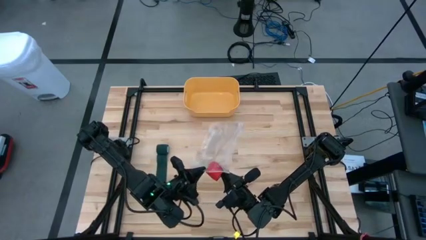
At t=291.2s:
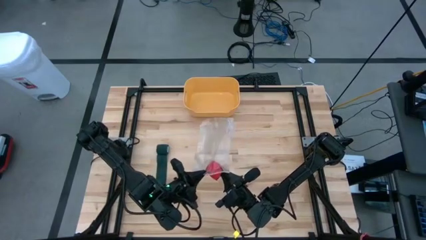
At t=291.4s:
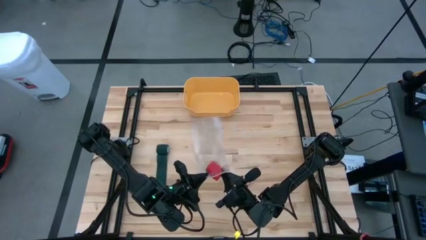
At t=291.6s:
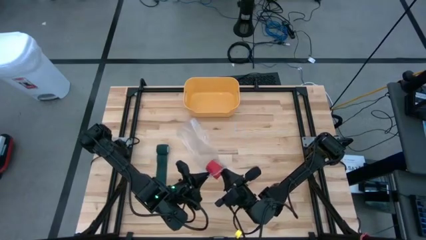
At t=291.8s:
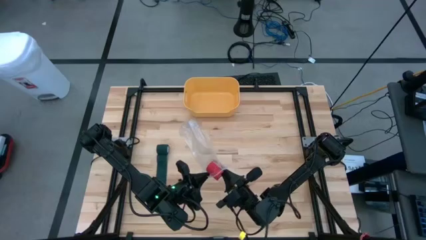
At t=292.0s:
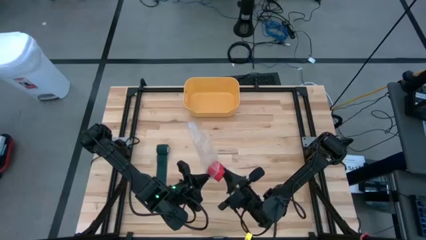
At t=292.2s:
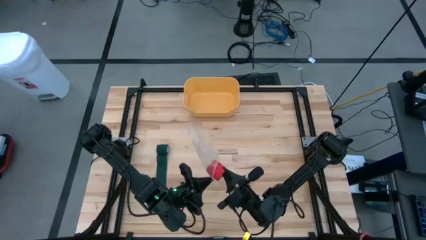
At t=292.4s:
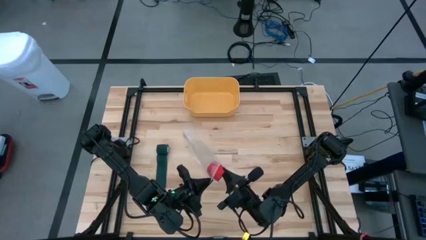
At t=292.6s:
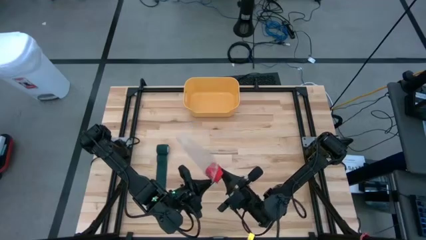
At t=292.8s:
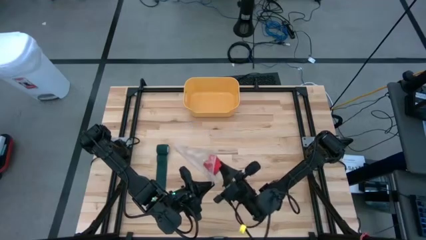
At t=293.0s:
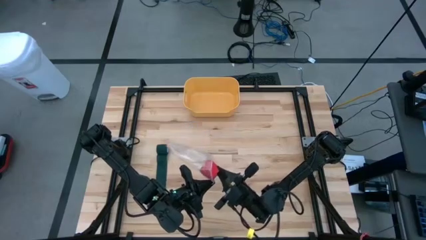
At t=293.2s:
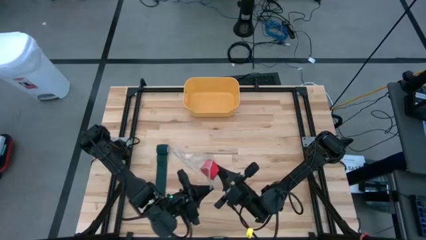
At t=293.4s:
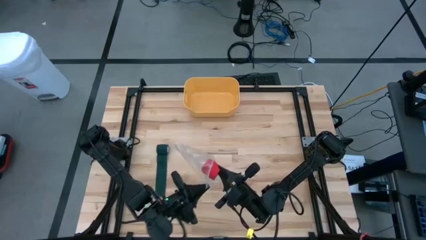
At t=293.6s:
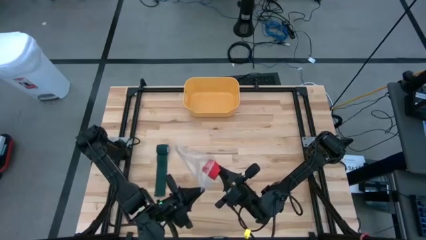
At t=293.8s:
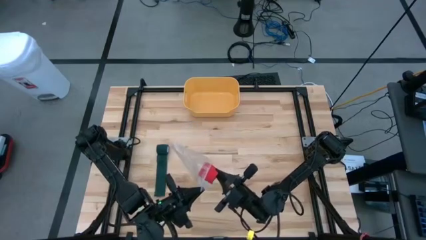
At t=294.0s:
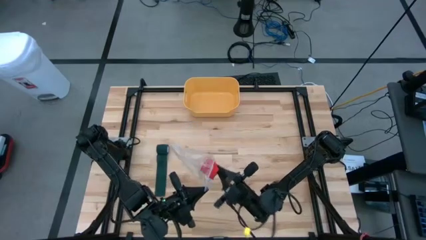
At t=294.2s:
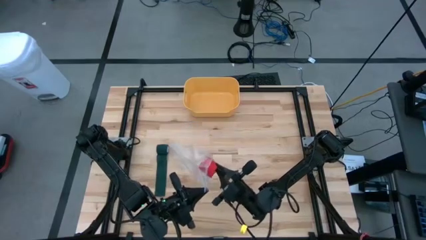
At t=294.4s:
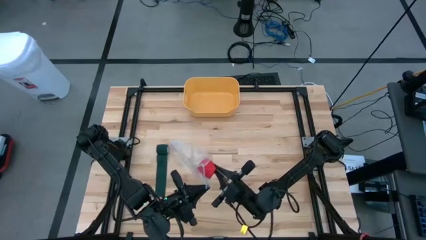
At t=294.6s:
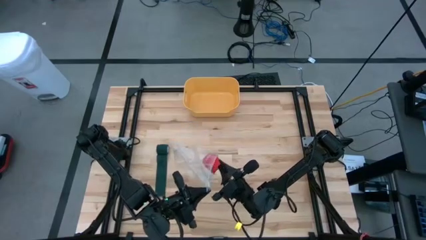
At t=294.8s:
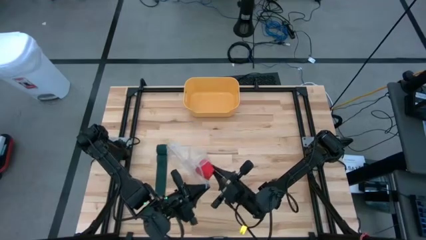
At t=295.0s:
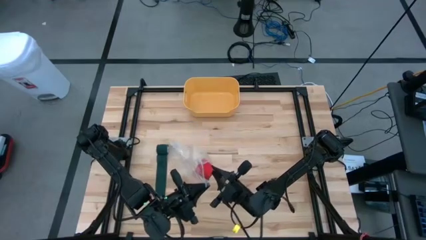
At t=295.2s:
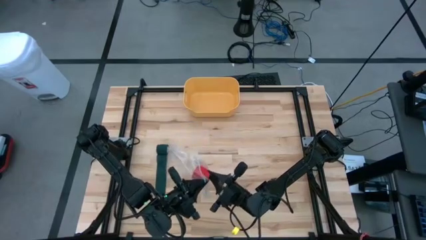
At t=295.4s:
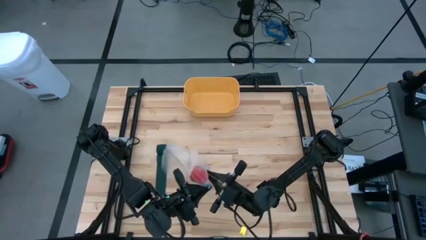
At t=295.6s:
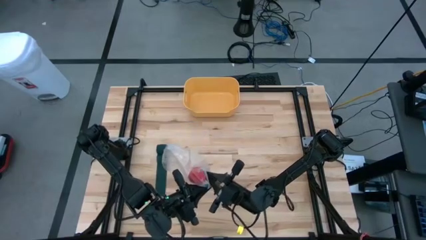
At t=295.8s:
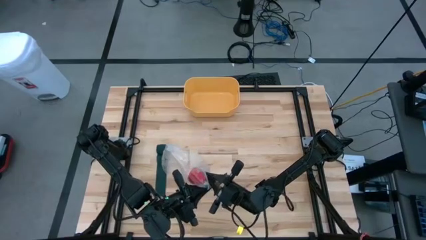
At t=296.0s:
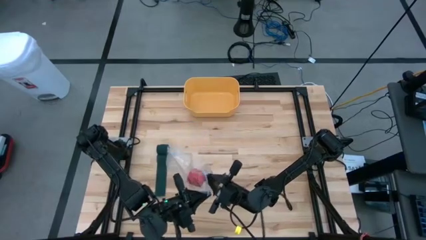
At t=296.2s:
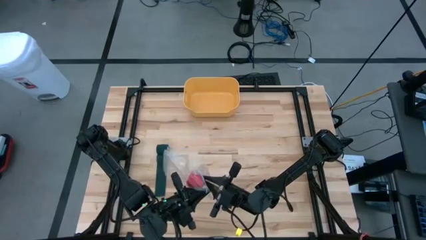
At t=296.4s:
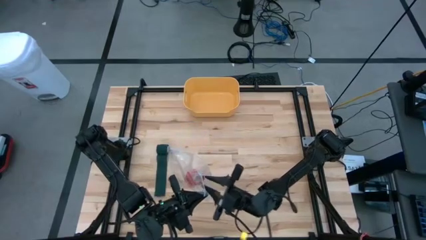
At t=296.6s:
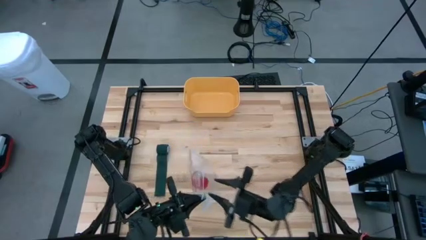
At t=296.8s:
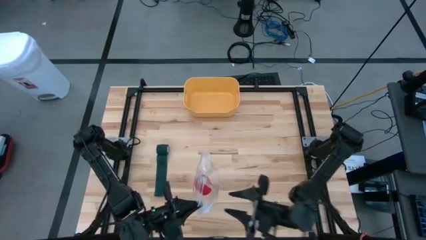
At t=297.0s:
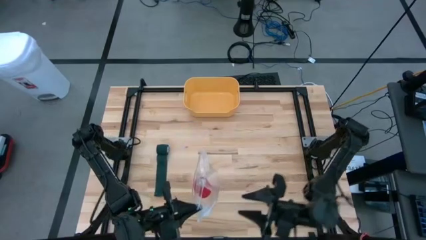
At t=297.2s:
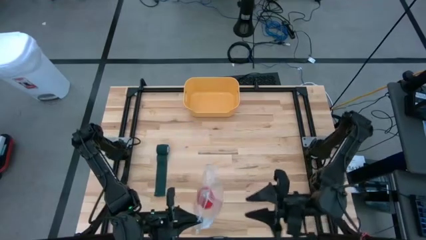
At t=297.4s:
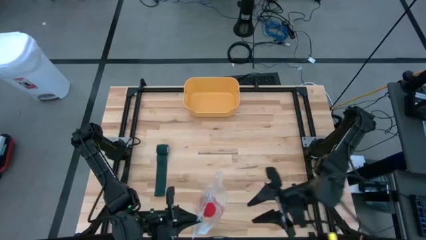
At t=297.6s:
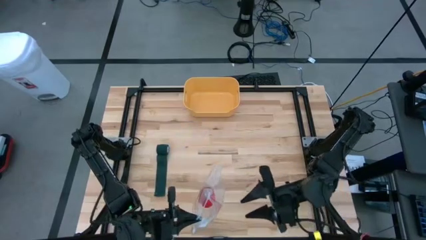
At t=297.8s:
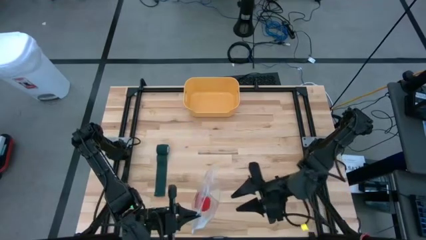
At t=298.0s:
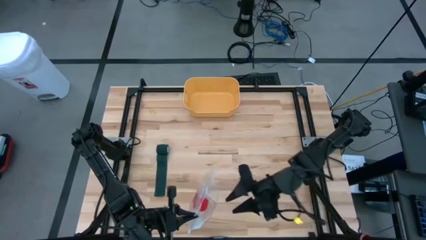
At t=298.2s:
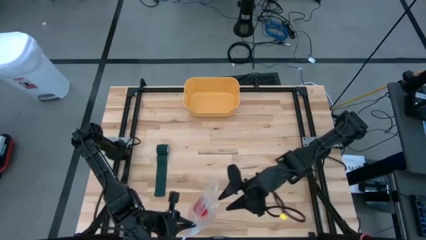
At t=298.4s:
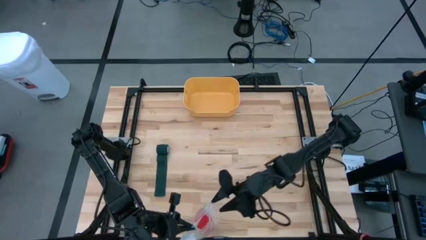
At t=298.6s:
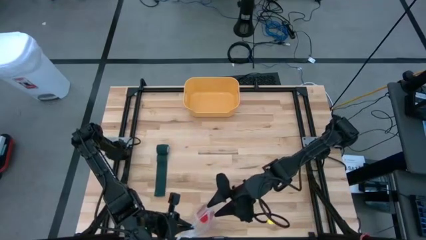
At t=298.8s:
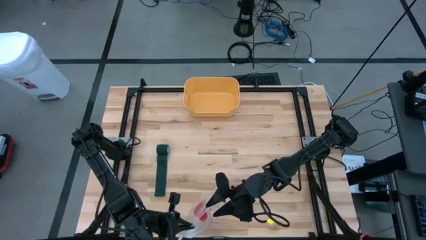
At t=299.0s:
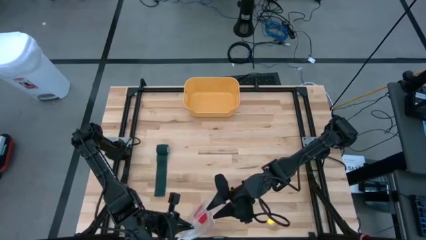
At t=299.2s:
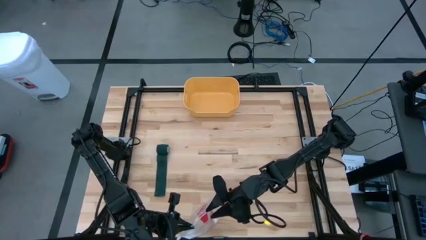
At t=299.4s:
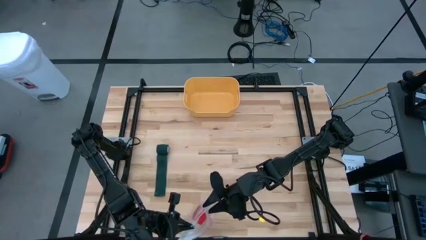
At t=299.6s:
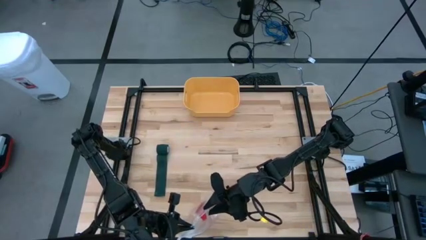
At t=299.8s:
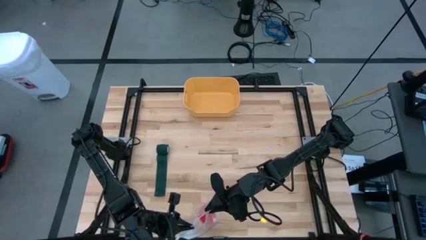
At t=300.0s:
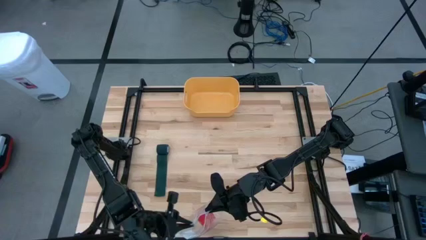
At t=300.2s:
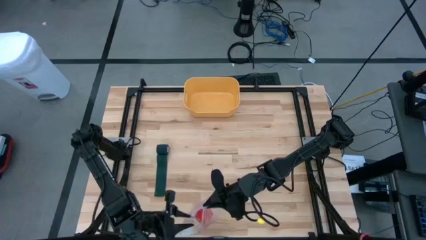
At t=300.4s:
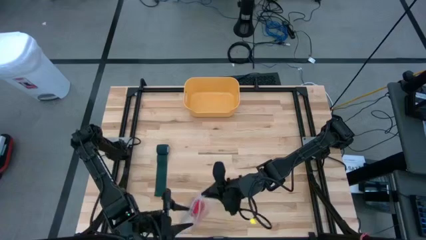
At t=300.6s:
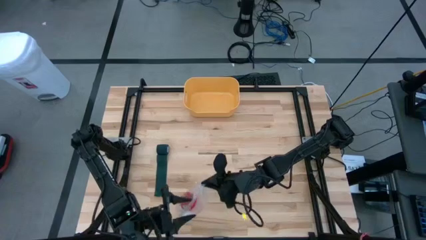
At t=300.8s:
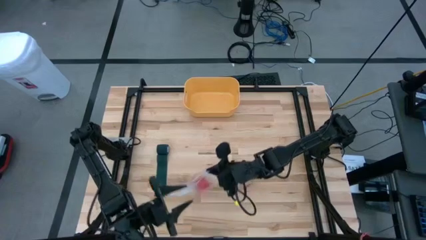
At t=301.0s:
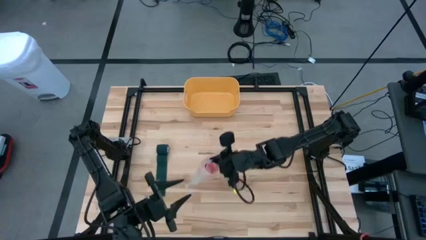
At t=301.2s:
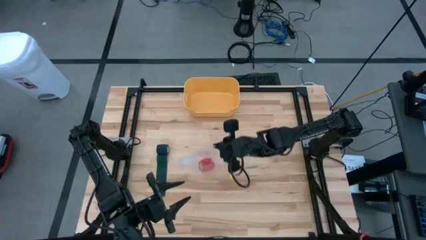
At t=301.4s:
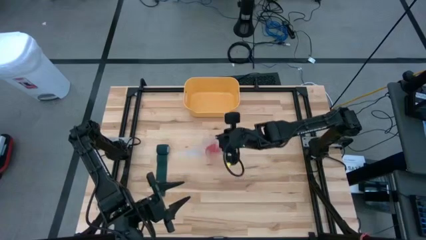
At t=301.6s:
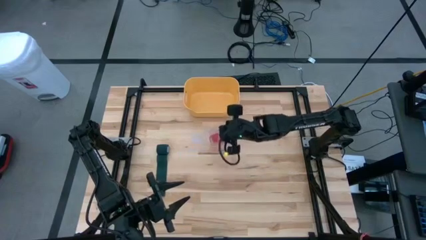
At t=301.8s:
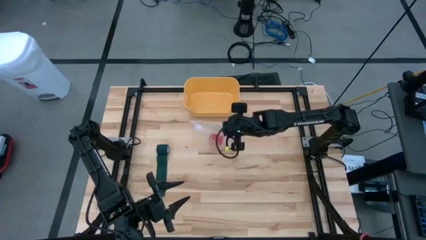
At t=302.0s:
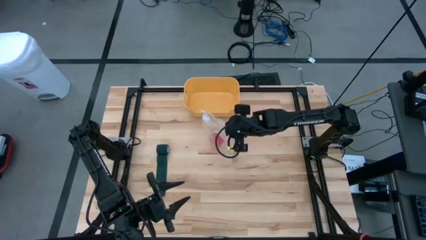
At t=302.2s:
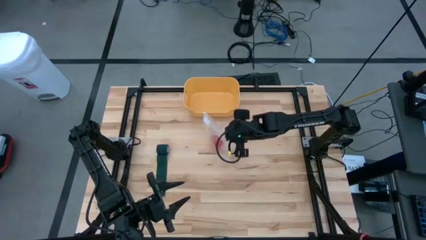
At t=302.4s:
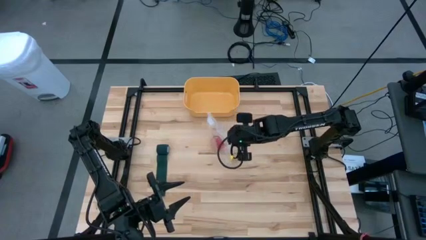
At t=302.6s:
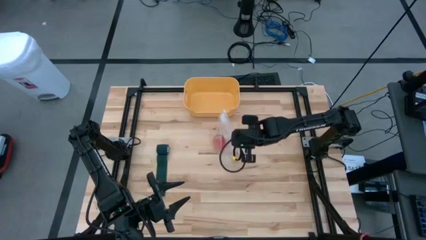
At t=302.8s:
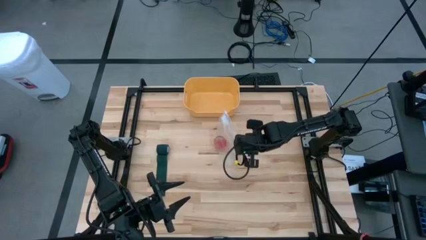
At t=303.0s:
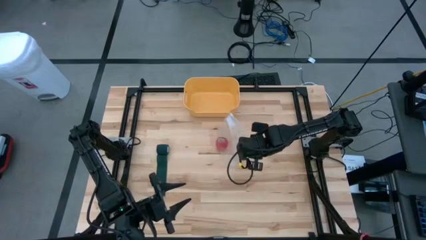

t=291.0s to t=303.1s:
Task: Roll bandage
Put the rolled red bandage into the transparent zip bag

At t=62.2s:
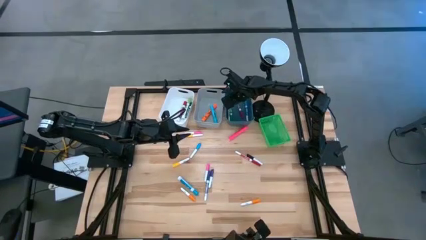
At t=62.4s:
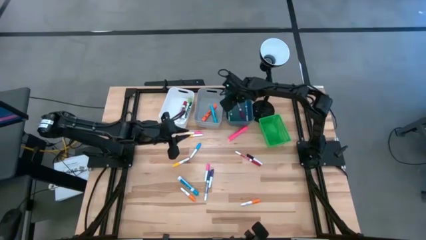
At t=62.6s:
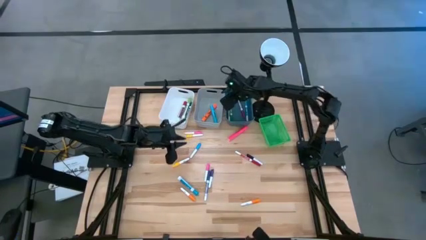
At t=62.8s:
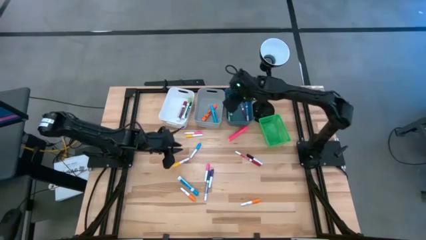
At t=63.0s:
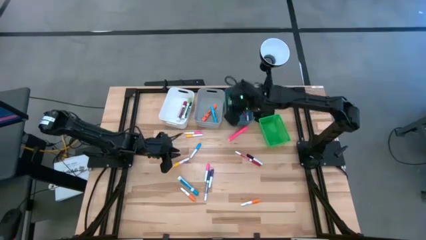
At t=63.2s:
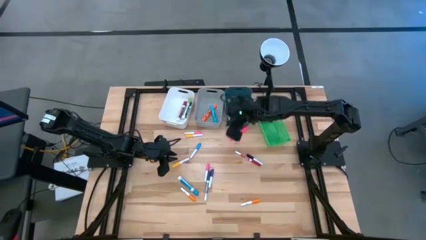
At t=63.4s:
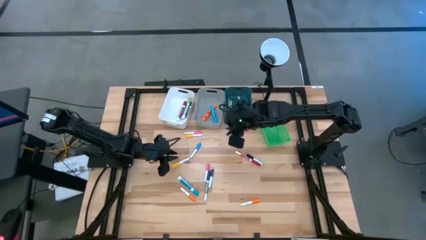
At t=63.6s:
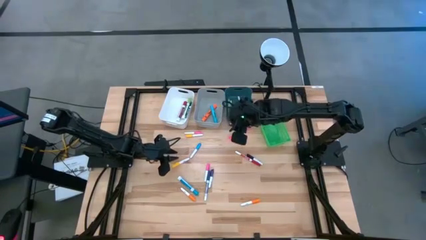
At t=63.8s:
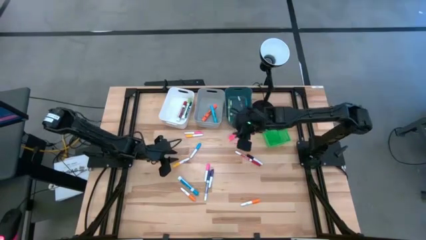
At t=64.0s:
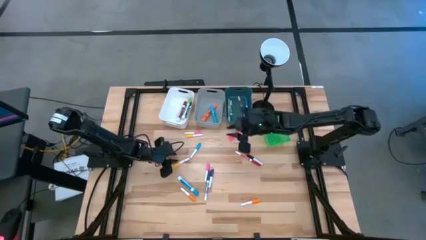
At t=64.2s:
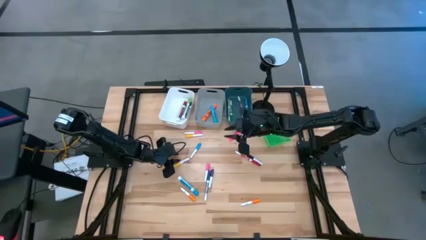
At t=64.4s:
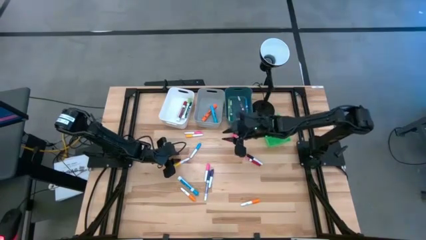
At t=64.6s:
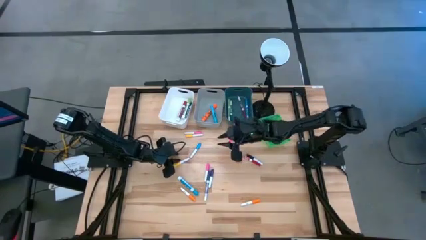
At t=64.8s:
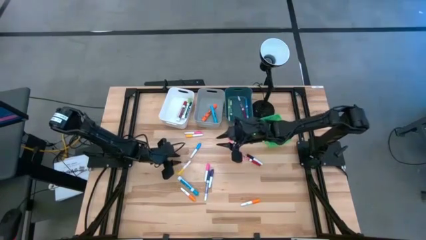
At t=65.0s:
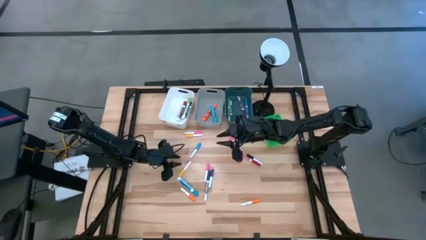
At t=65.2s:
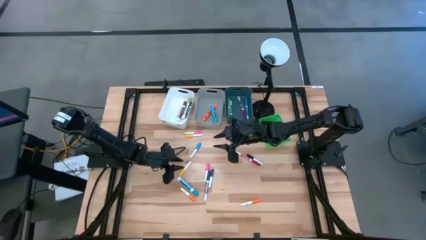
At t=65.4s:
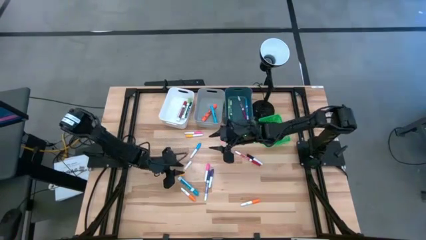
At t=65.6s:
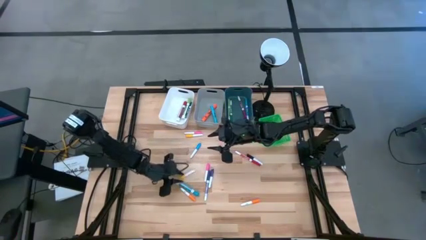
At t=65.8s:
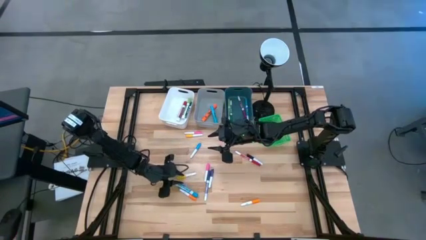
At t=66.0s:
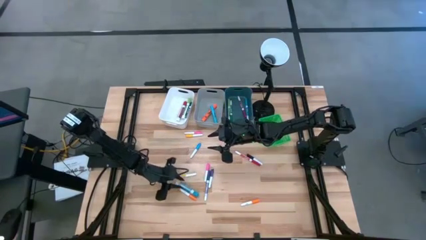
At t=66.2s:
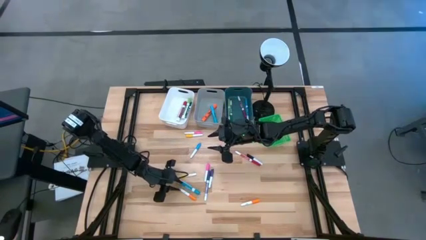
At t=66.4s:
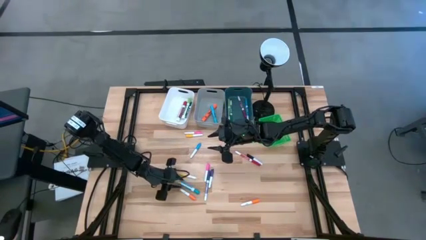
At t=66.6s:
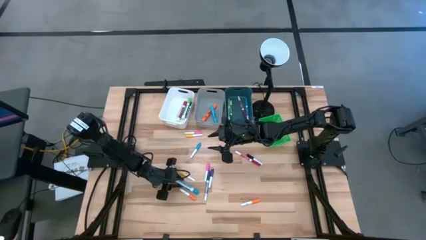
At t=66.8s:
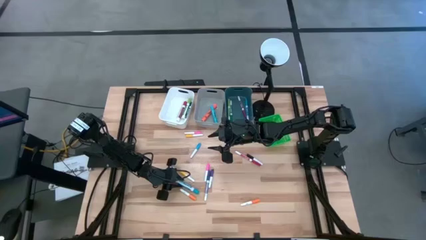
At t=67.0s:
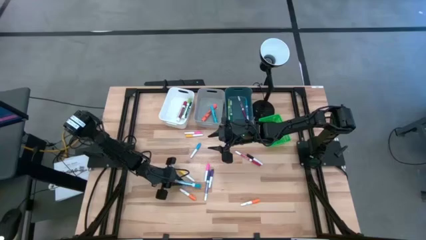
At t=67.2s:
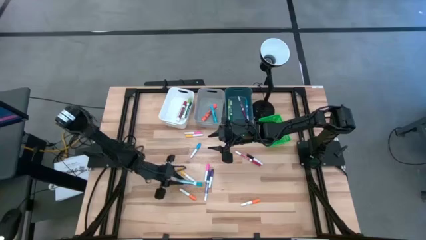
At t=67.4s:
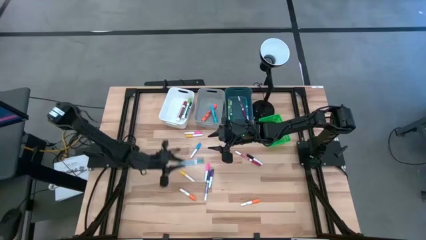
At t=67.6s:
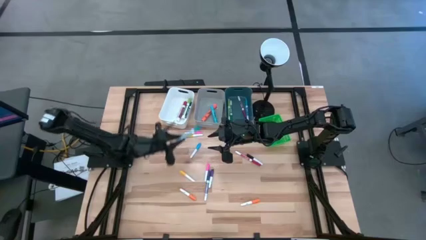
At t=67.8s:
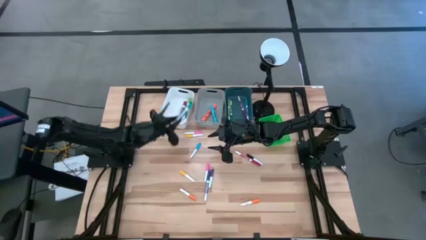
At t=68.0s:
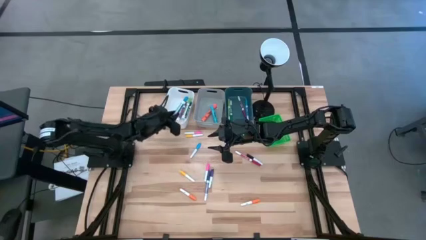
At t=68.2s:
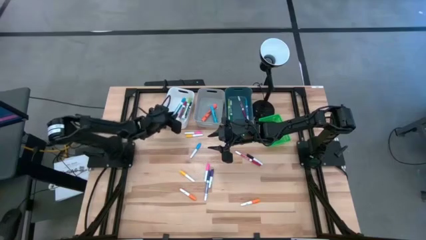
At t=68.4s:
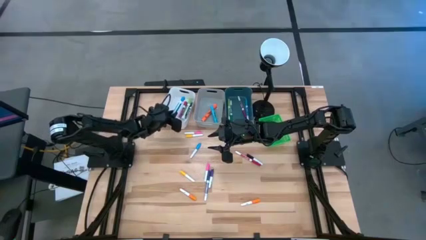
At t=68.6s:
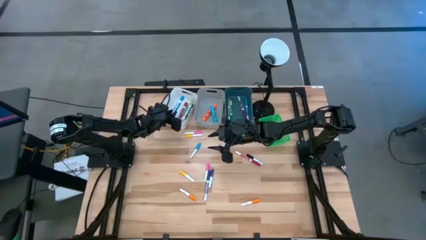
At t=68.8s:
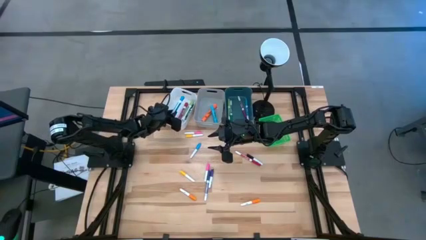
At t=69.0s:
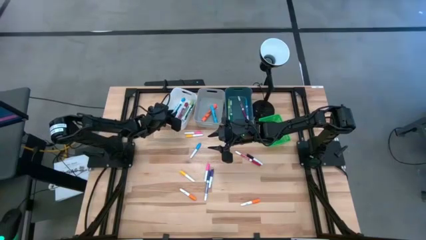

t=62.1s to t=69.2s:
Task: Pick & Place Markers
Put the violet marker pen into the blue bin
